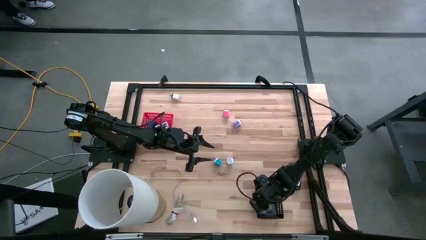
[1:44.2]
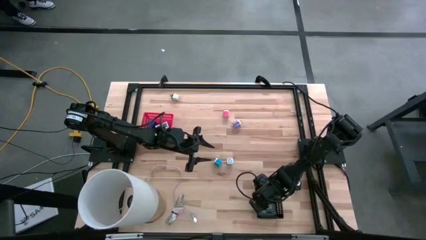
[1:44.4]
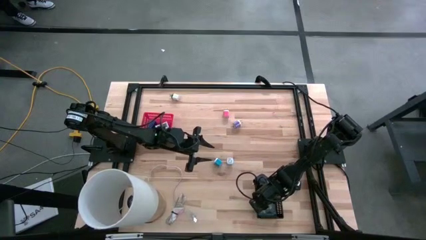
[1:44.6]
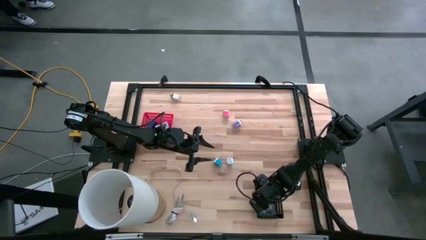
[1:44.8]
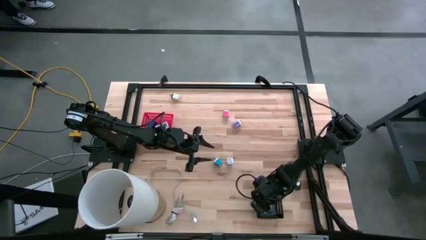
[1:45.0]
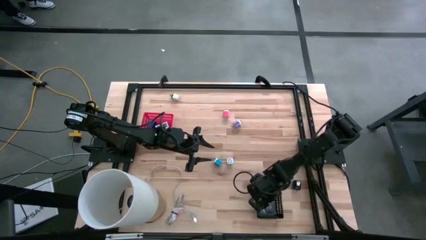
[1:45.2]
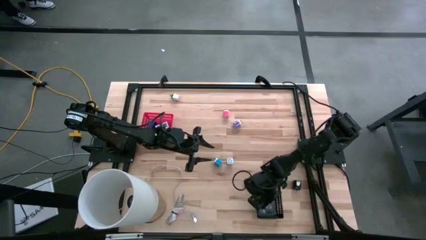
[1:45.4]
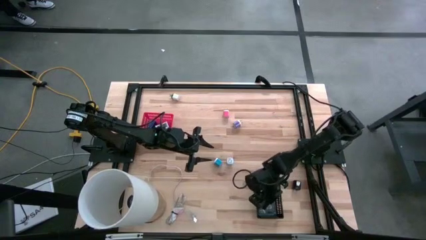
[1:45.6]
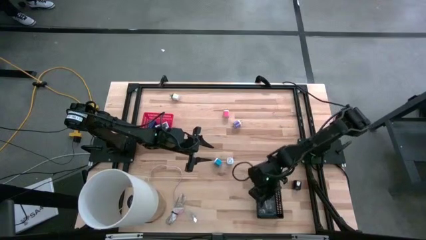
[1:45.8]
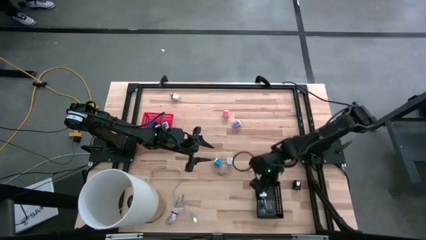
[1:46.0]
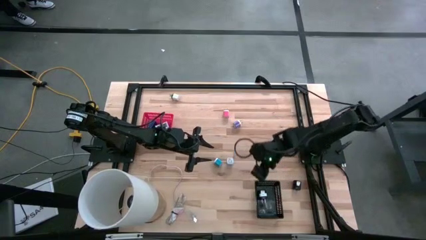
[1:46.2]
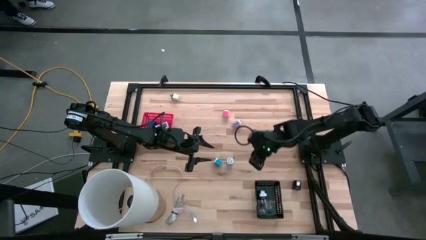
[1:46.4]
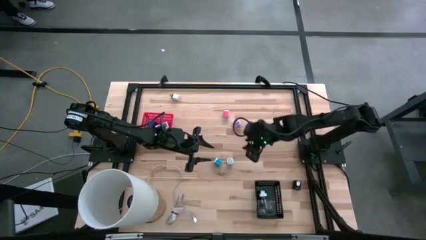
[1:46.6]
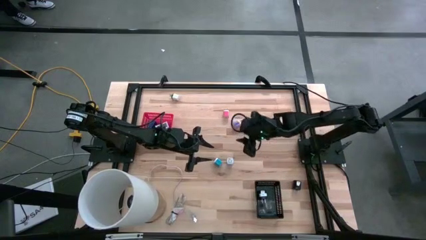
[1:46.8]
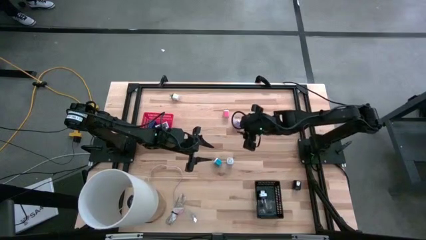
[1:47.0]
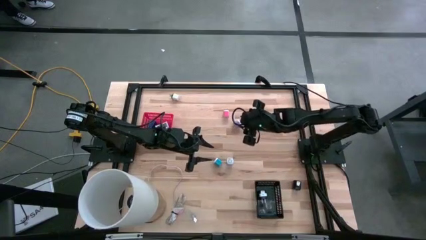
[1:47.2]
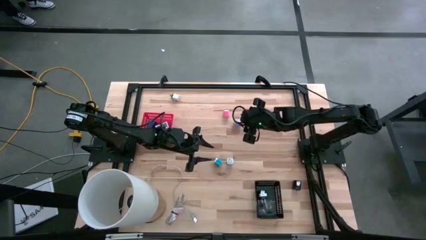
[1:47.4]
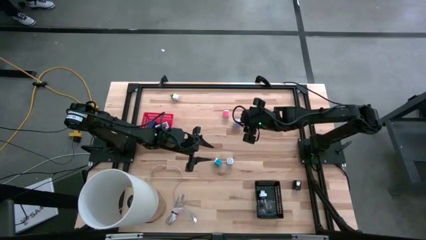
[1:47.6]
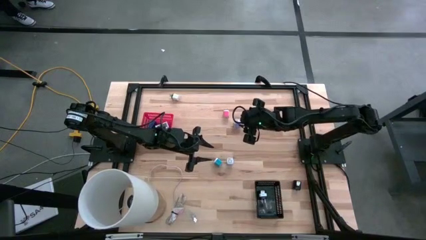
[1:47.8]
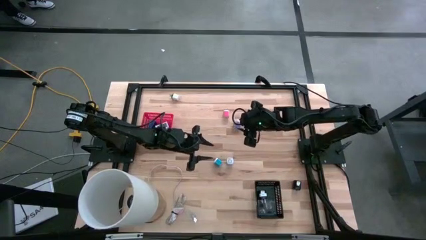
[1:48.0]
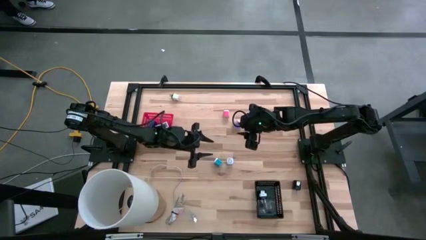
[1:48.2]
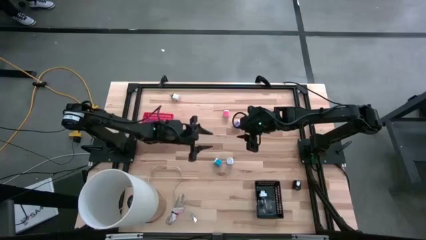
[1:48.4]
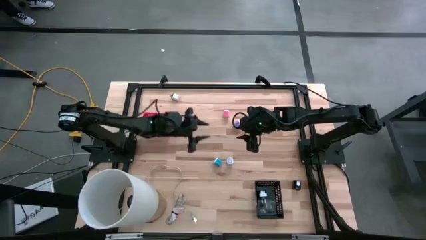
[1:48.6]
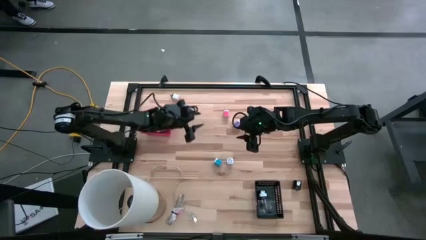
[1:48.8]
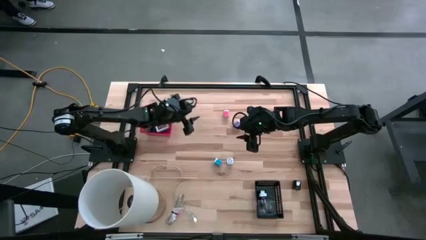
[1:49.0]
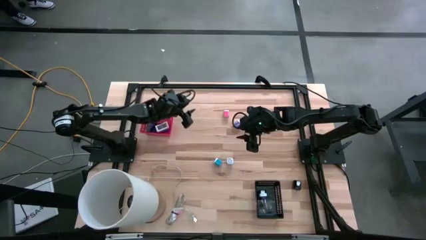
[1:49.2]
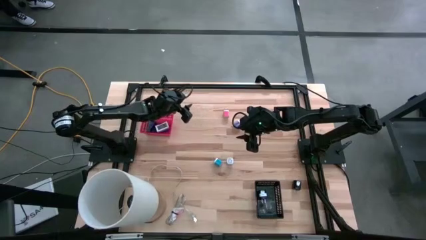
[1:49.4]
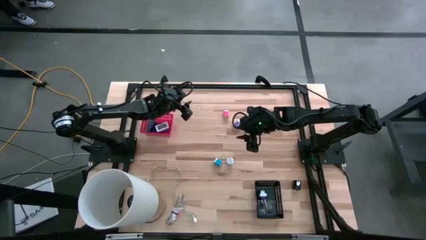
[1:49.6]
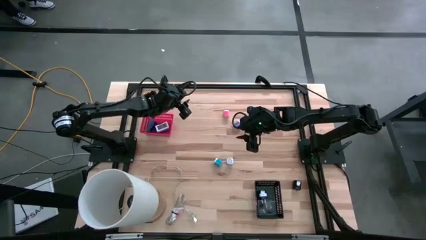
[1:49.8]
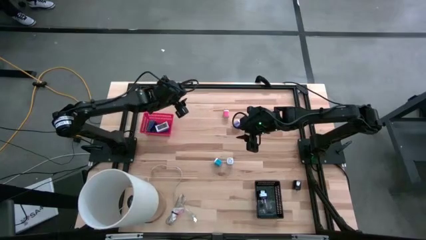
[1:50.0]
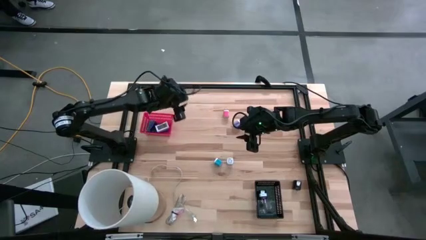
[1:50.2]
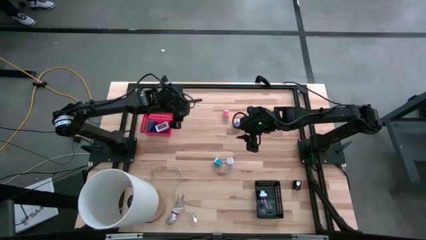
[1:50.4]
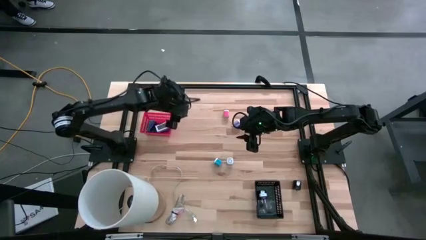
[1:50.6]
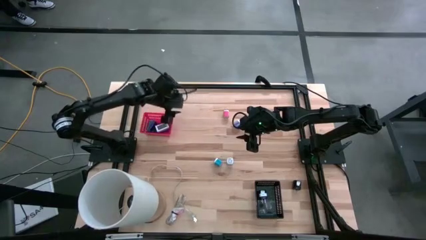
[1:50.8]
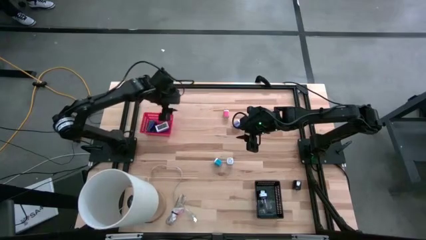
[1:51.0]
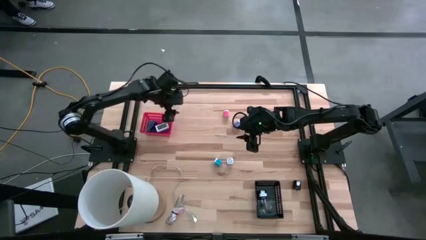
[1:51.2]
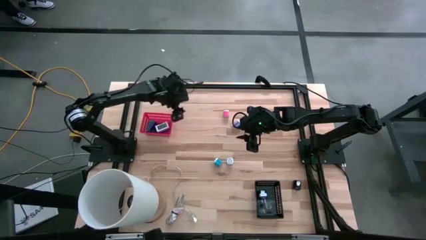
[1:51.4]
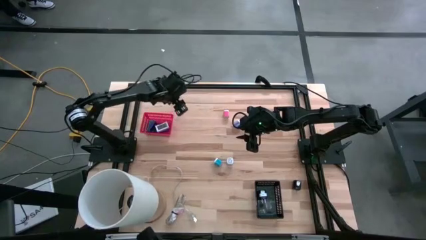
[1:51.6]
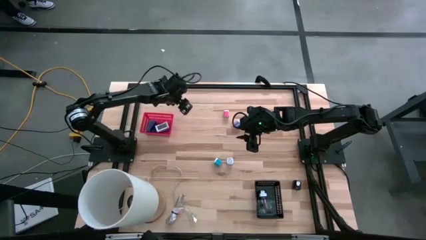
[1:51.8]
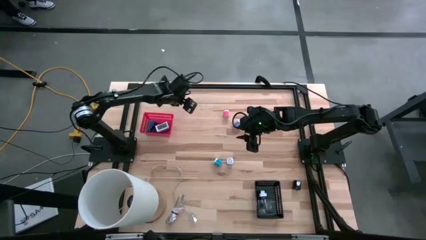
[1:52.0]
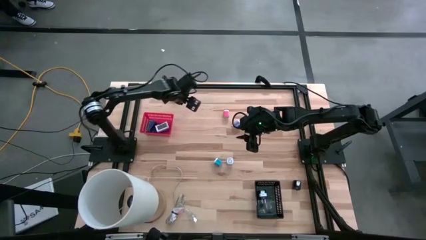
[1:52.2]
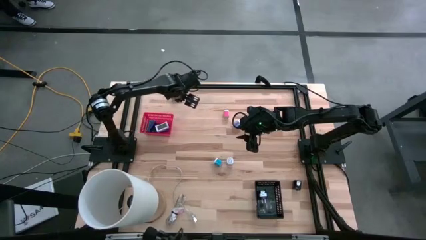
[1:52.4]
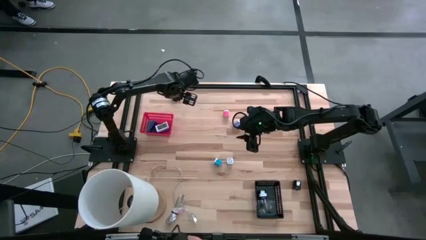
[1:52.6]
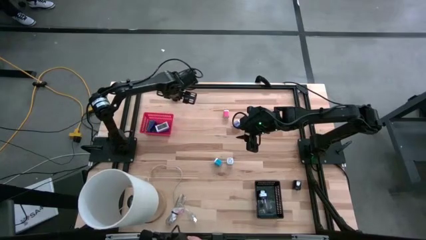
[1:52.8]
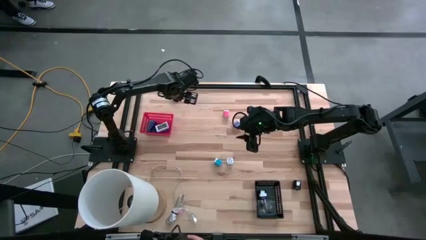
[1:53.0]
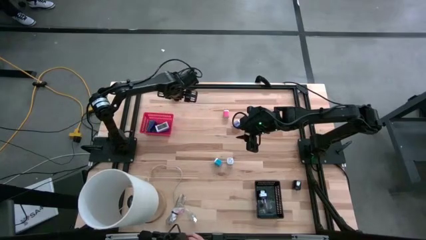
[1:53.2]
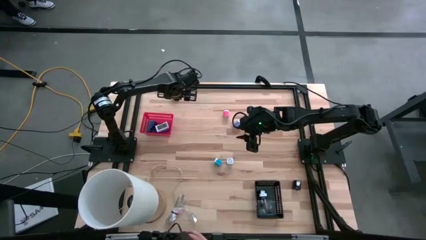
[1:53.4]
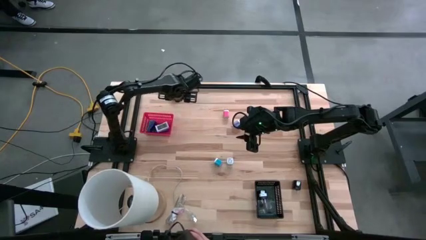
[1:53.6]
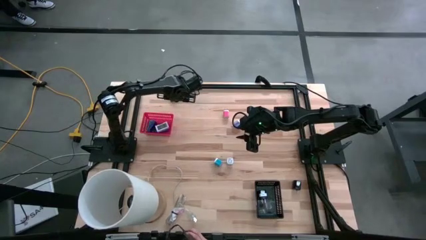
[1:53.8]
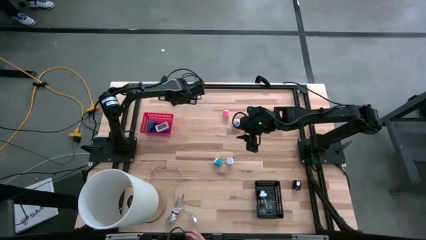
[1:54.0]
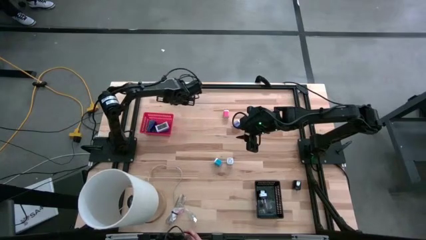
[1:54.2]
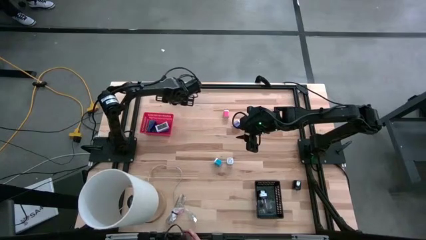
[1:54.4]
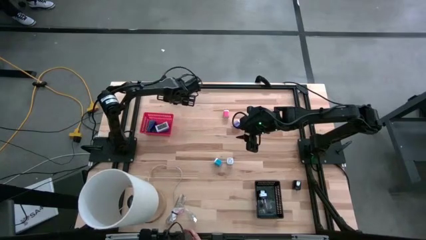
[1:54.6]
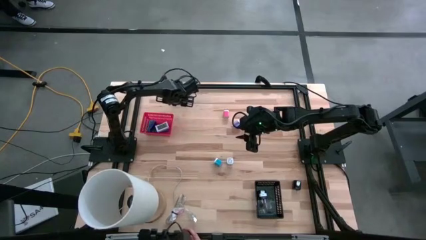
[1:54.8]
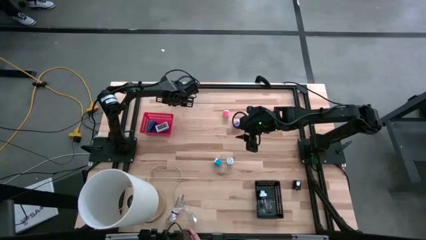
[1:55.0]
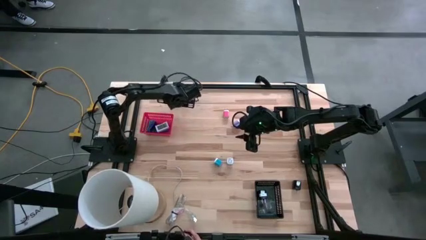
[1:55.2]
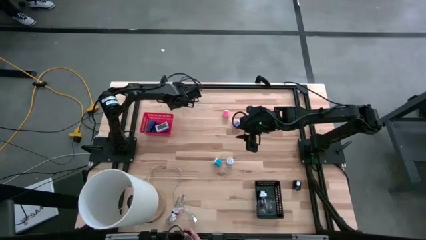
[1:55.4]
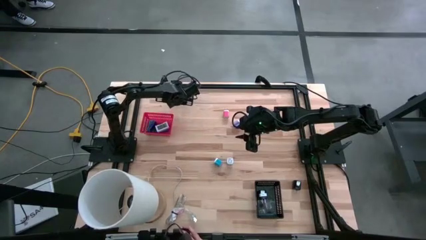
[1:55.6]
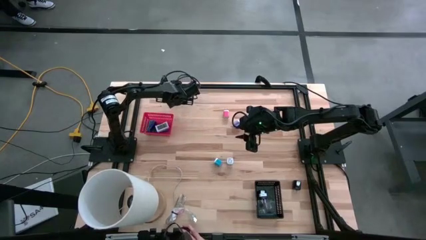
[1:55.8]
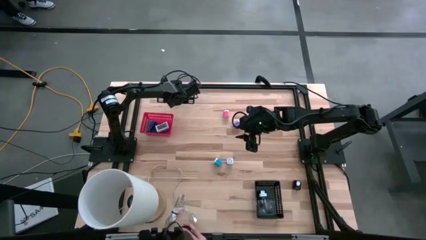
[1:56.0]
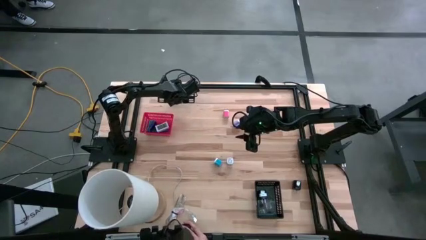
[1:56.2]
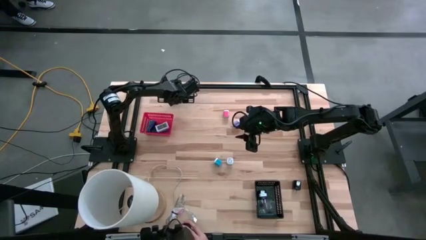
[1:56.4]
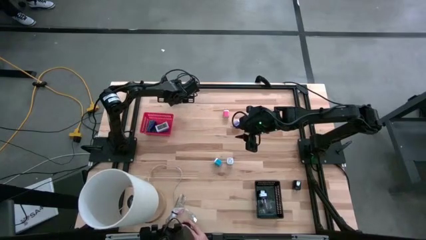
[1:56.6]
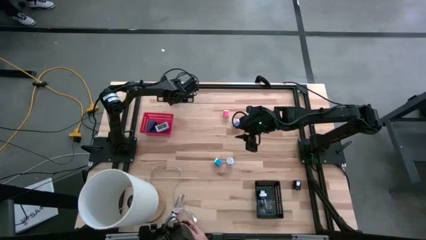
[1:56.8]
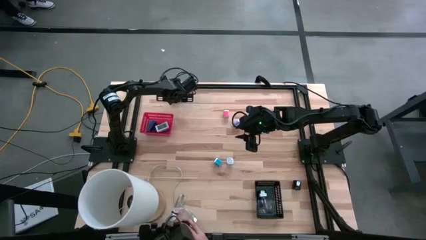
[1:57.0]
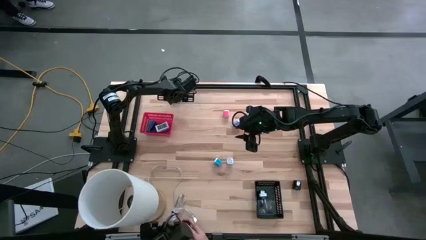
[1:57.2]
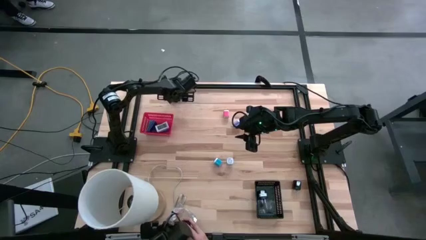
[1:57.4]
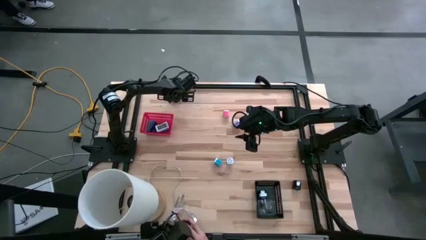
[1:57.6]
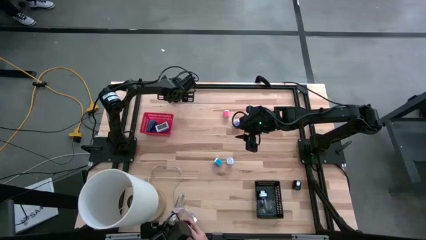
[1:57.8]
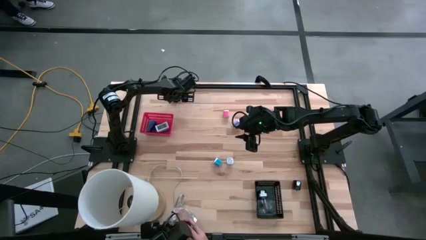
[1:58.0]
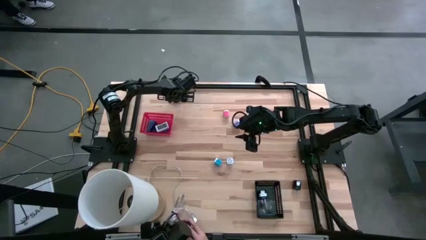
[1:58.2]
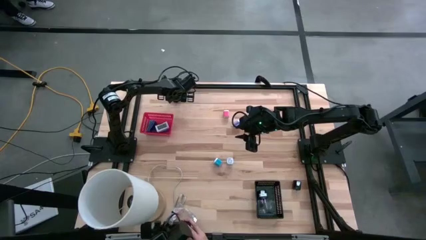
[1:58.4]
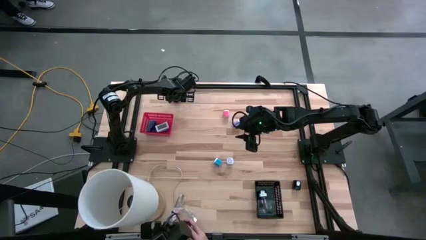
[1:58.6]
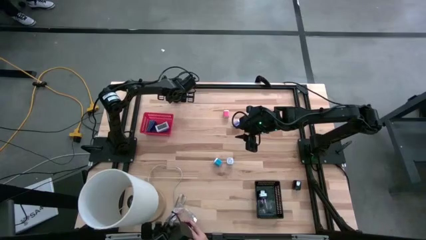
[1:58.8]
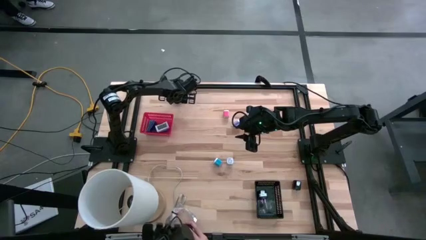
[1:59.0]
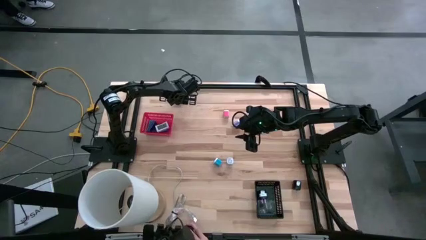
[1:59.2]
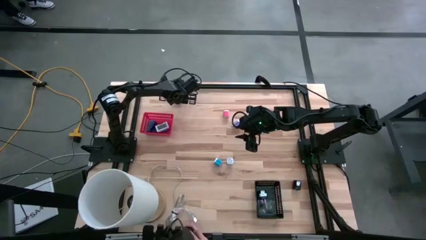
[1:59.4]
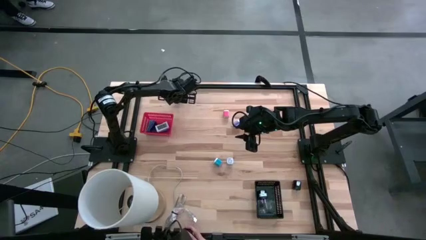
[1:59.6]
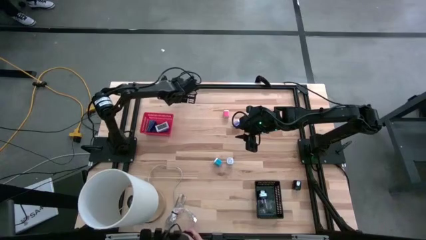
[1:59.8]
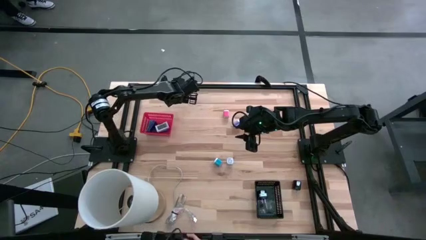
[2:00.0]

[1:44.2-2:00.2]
Task: Pick & Place Office items
Put the white charger adapter into the black bin
